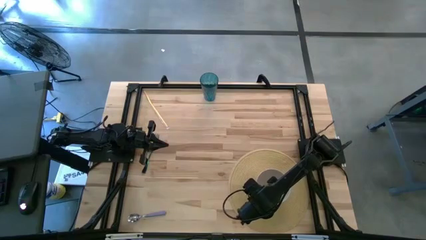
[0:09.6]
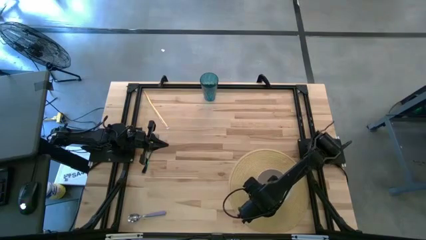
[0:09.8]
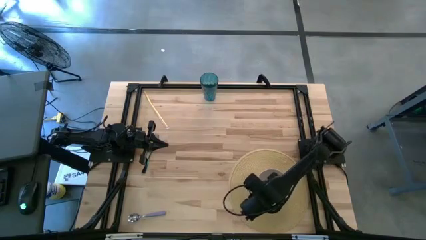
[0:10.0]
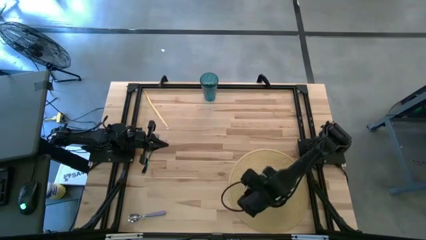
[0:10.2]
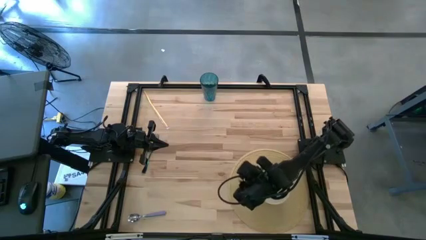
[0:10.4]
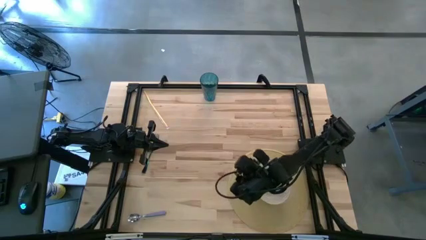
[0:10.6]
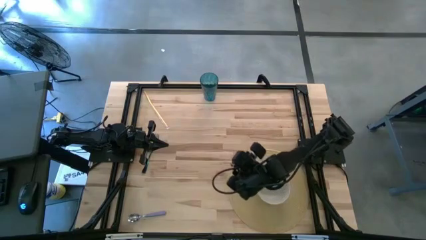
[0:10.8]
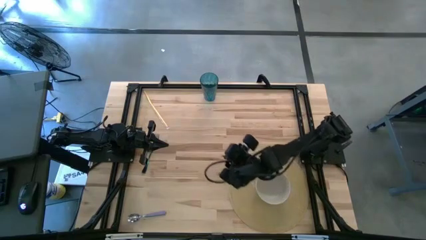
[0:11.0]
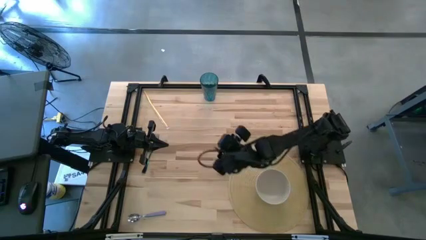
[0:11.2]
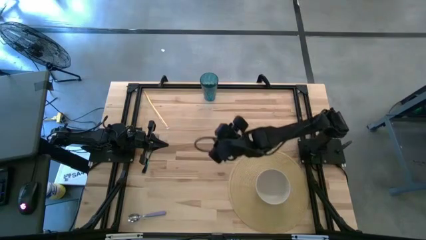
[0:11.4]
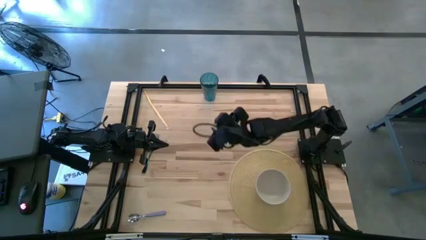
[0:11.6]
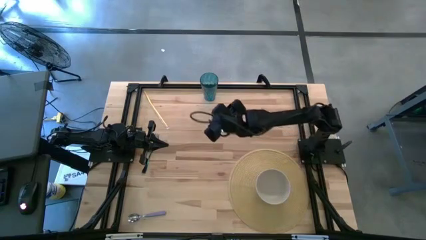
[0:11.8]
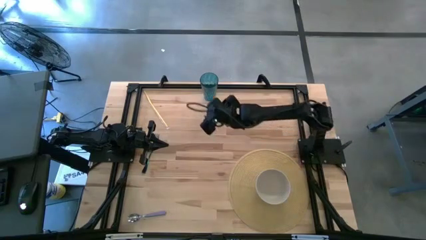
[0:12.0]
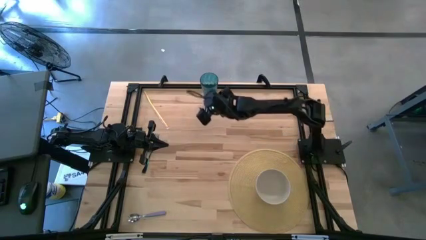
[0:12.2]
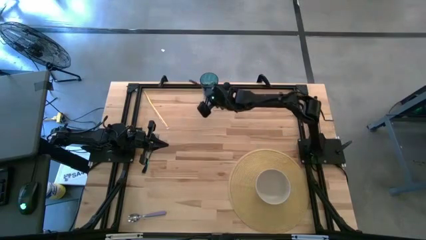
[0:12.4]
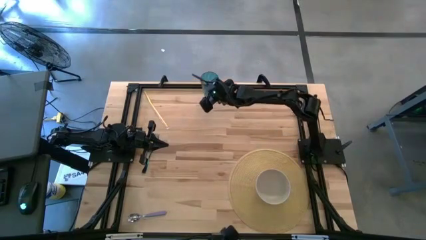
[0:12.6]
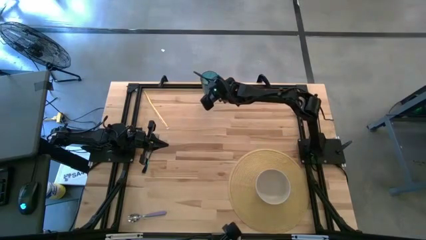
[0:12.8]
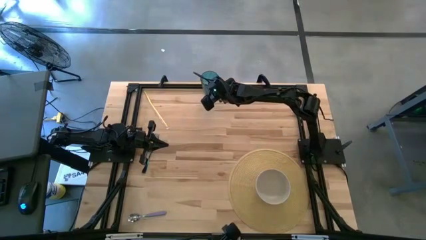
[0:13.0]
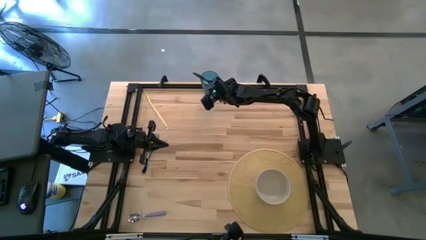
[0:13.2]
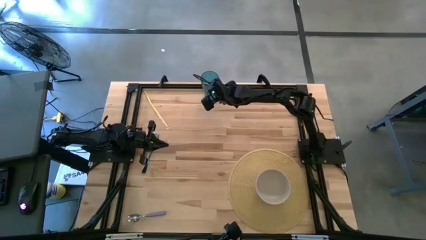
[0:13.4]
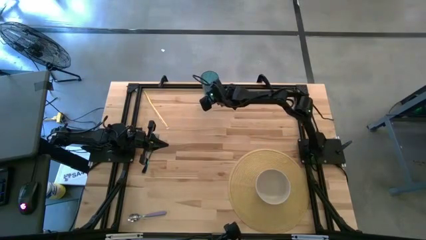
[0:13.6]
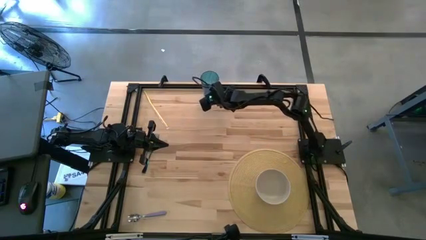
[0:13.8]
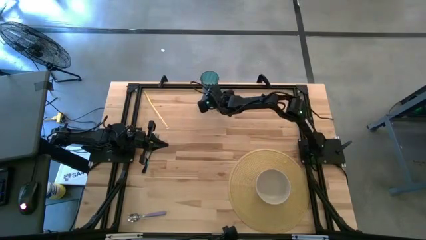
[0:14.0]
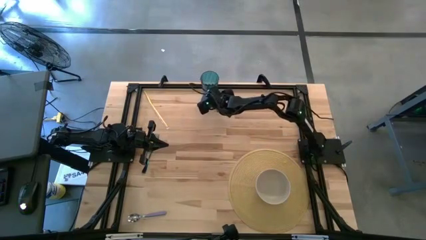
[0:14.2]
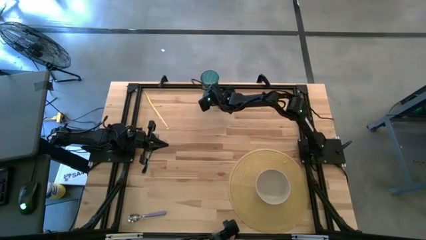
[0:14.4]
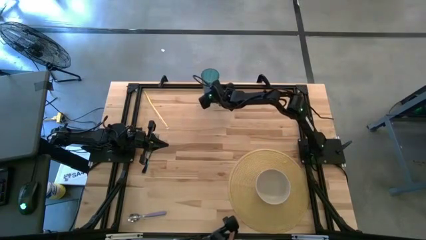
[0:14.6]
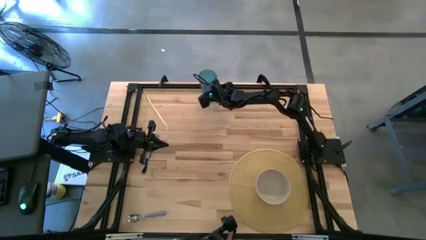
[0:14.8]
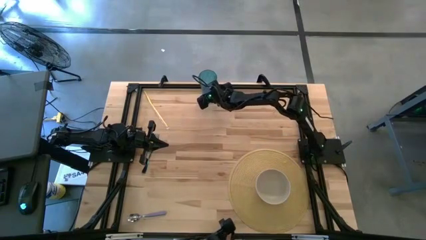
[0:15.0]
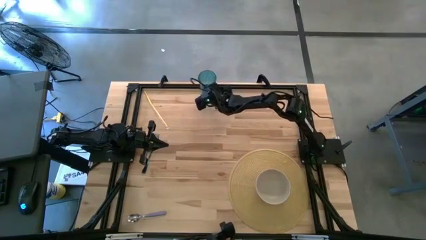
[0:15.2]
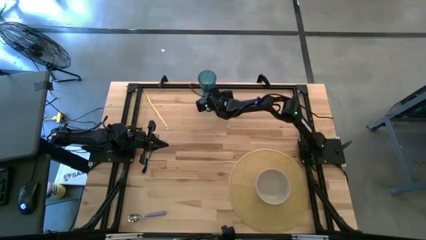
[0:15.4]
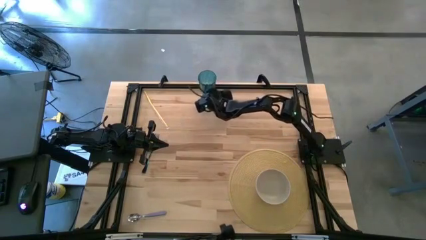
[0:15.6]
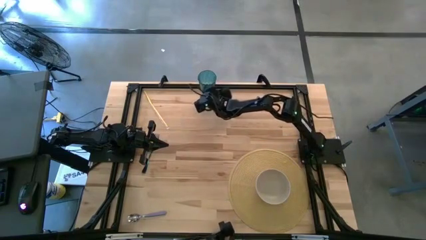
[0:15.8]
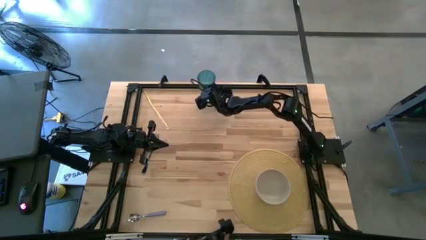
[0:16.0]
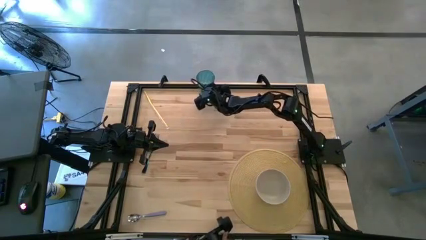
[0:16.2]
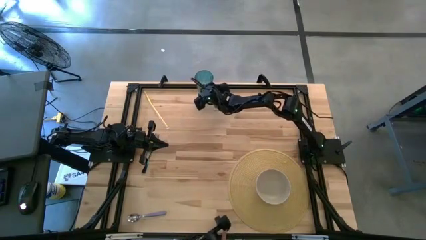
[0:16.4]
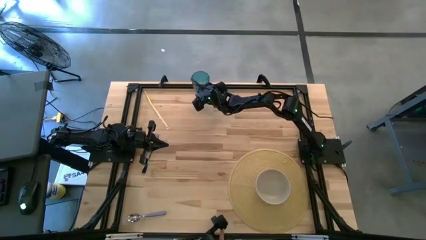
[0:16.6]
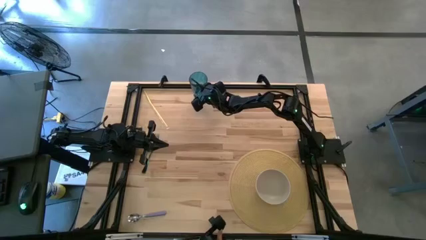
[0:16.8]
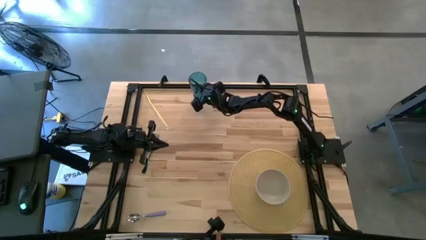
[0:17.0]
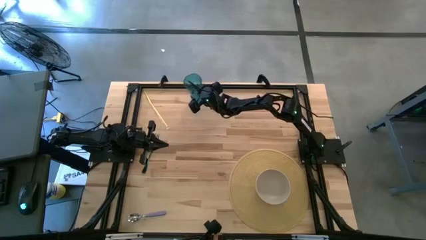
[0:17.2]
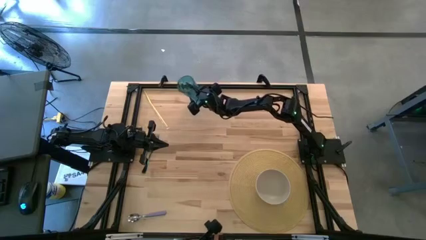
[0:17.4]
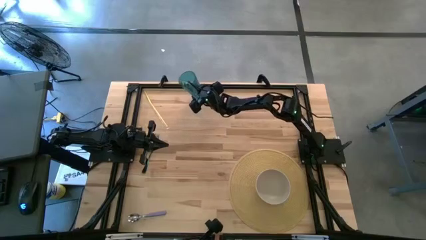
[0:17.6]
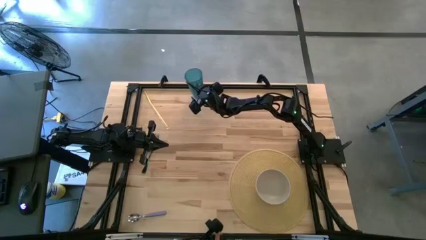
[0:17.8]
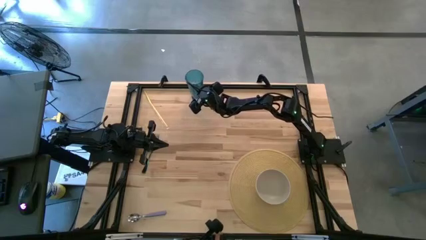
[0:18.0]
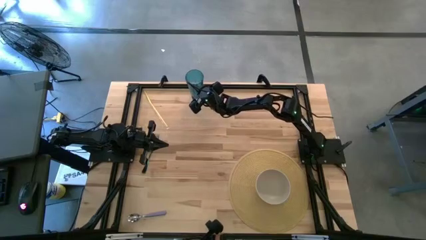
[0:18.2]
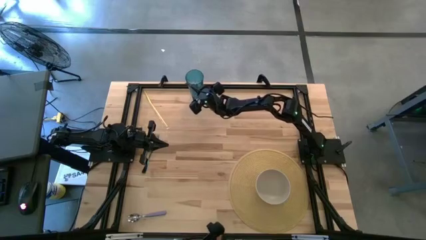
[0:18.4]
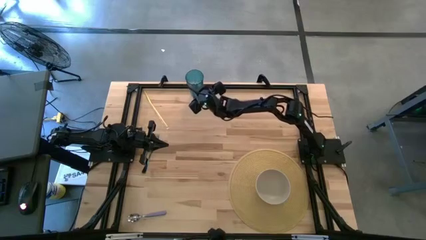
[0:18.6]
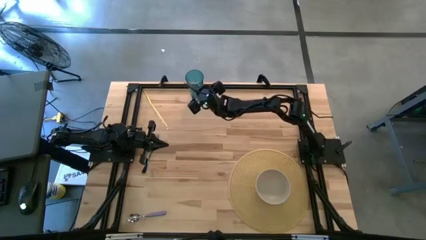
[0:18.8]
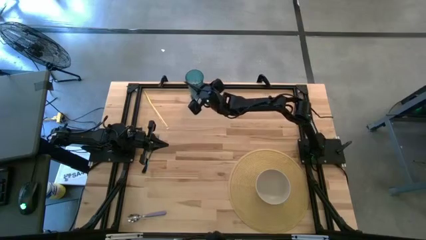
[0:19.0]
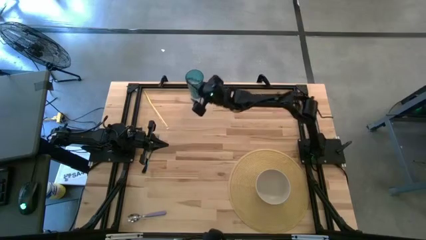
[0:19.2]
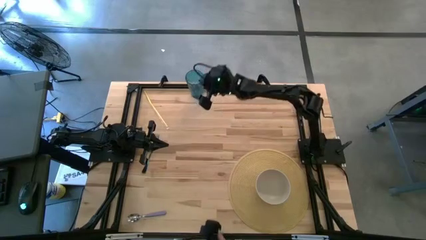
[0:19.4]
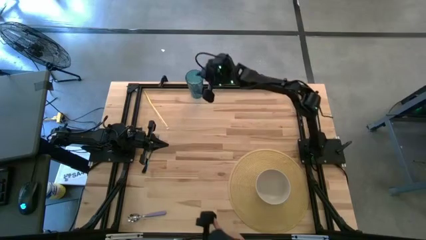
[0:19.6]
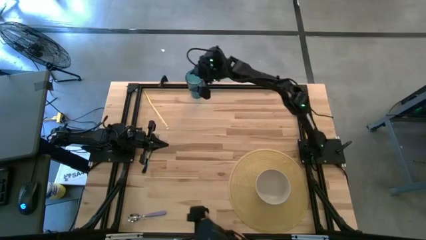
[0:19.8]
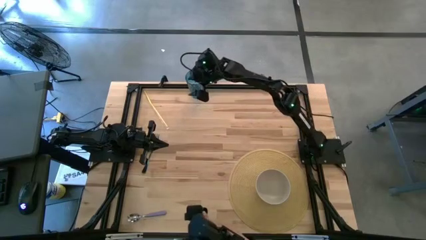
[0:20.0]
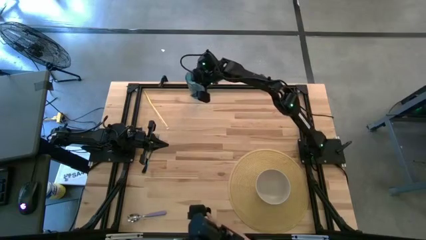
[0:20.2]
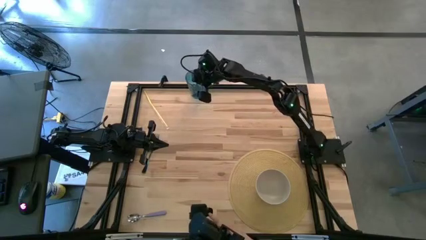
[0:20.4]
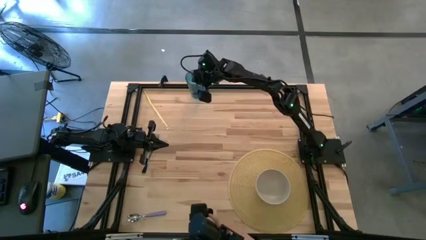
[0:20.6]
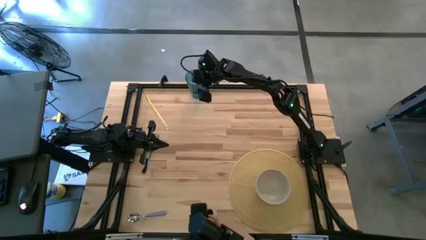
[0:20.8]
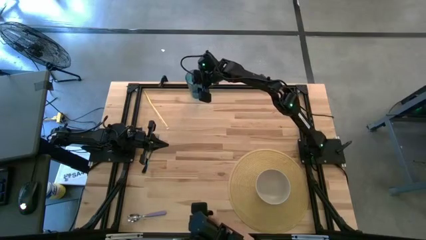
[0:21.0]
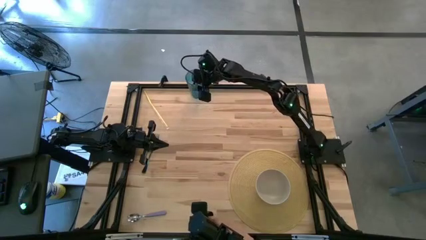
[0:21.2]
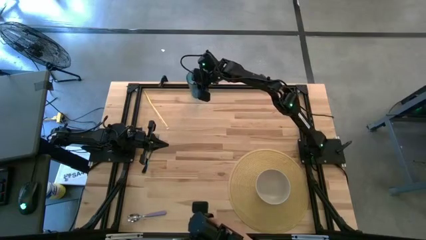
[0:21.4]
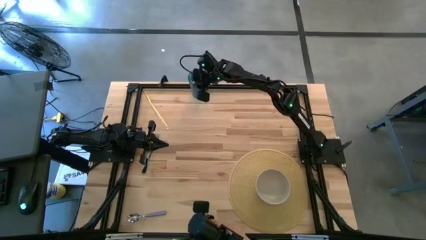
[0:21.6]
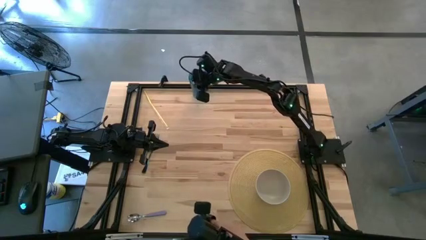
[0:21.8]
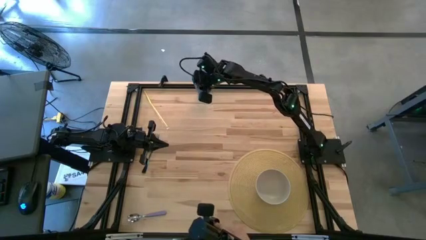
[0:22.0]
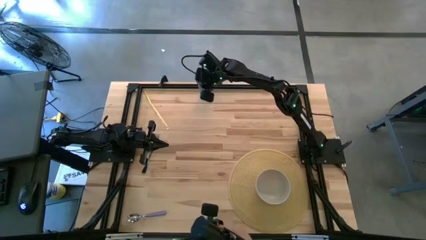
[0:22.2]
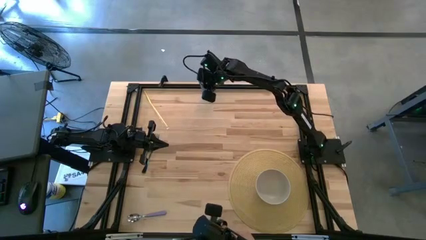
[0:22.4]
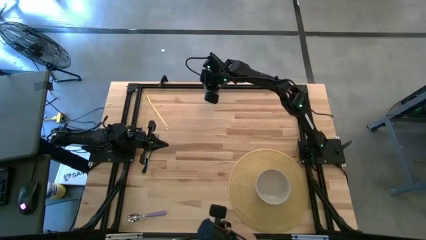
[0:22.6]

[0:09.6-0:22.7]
Task: Pick & Place Utensil
Put the blue cup on the brown mat to the top left of the white bowl

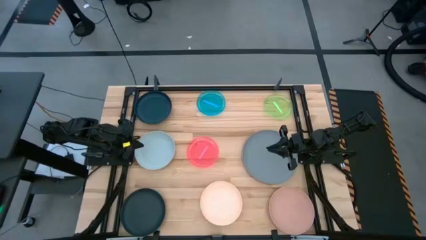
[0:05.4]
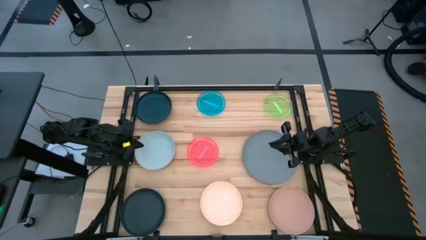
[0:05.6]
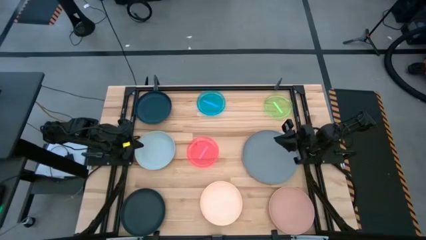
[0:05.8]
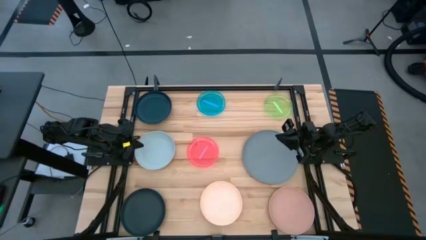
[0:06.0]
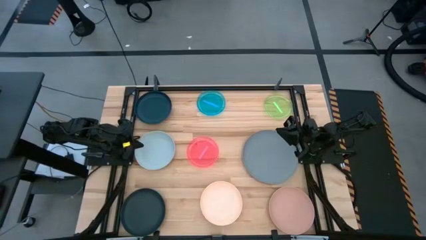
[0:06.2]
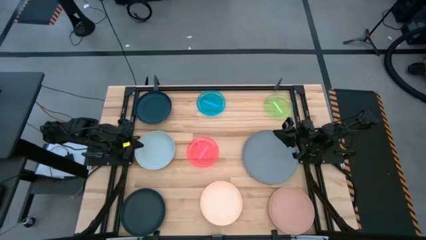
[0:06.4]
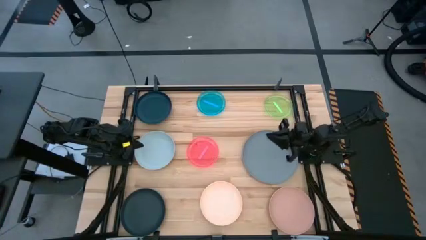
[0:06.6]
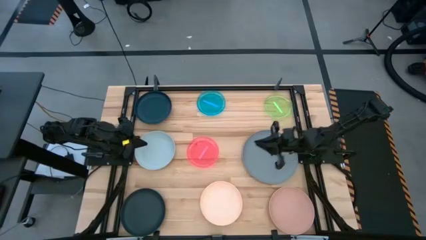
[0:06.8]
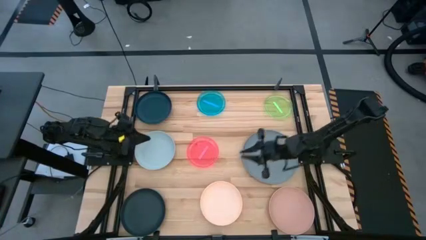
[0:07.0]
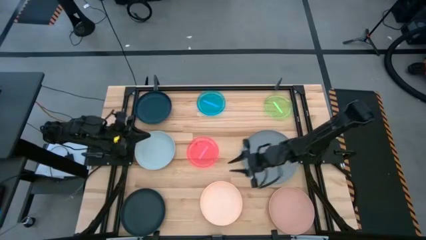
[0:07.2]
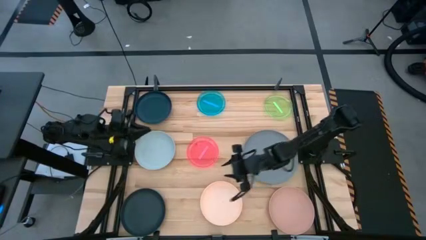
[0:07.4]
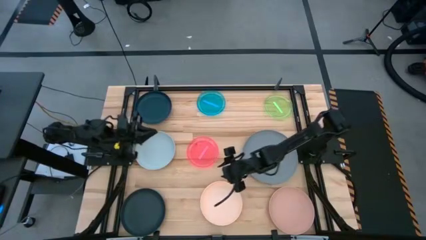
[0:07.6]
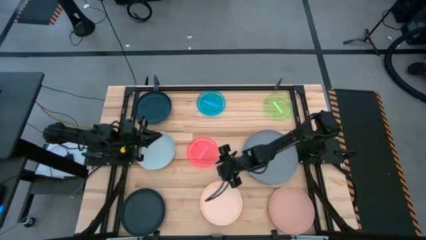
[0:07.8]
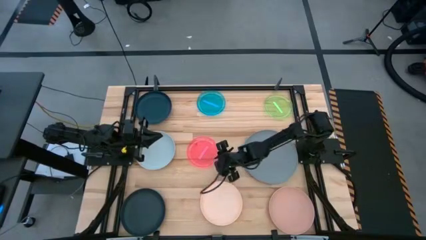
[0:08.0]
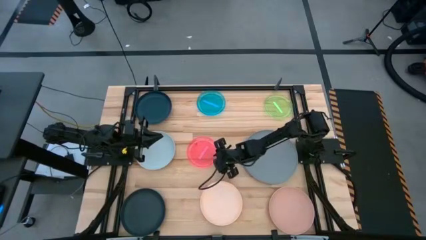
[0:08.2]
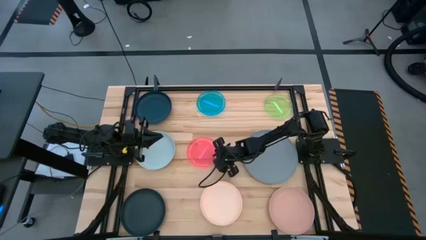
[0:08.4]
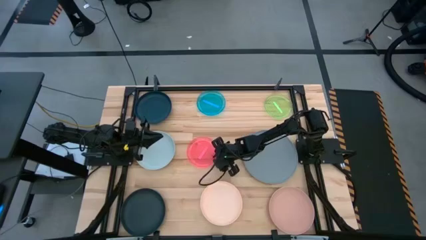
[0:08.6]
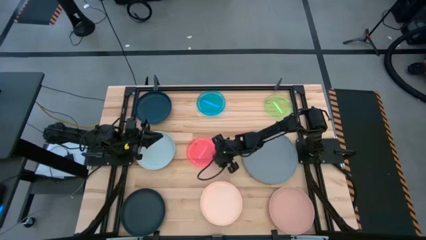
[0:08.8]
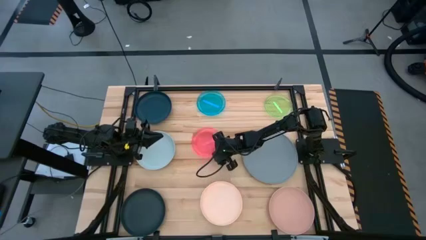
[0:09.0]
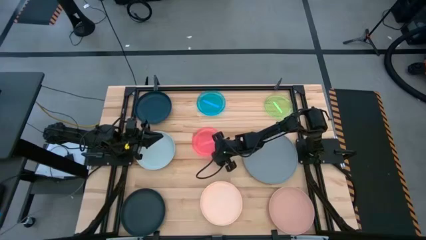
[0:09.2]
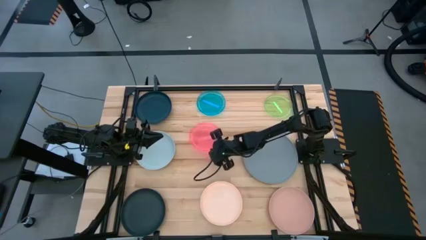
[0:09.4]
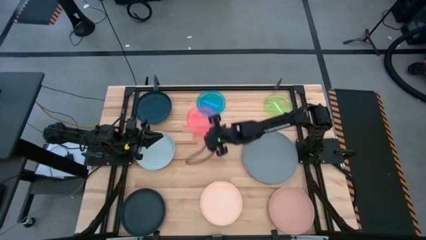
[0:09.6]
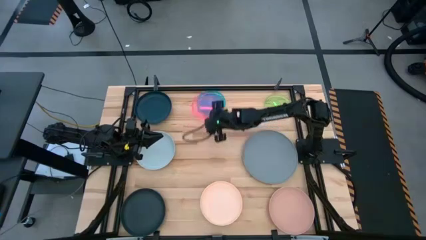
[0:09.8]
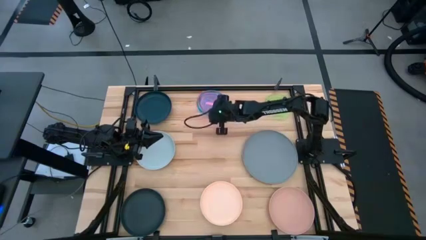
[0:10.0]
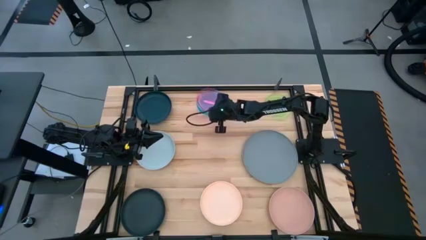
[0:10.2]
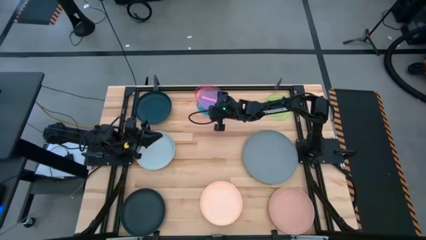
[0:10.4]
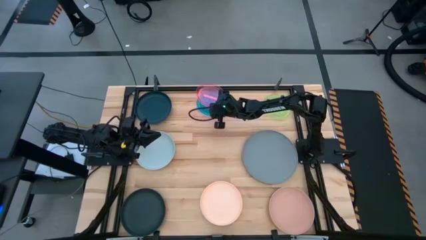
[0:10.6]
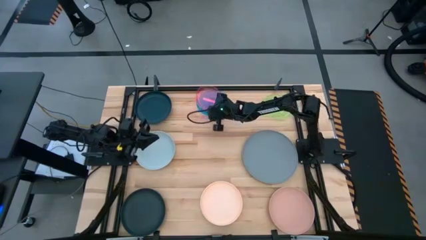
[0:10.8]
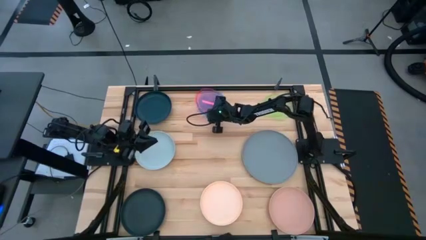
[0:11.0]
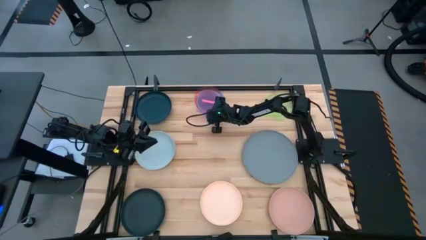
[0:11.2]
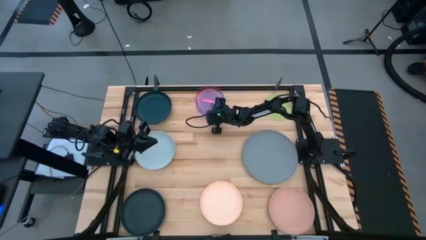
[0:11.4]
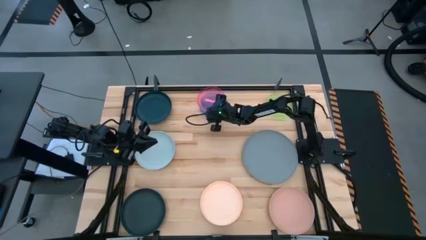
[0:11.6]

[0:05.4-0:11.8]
Task: Stack plastic plates
Stack the pink plate on top of tthe blue plate
